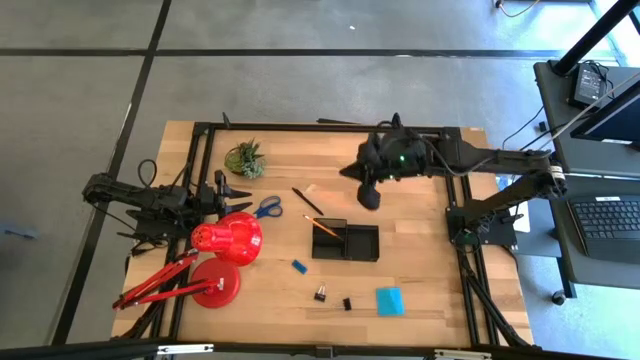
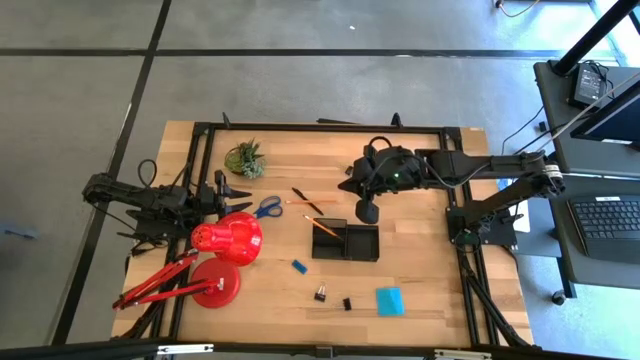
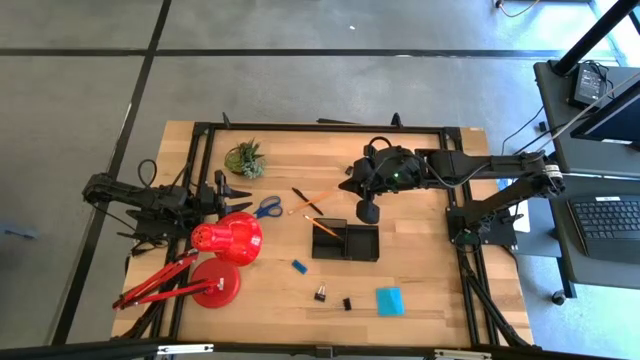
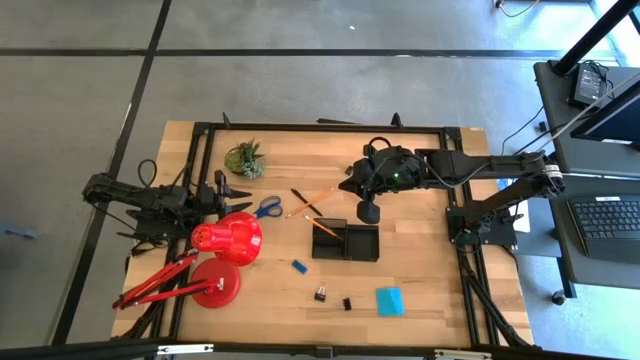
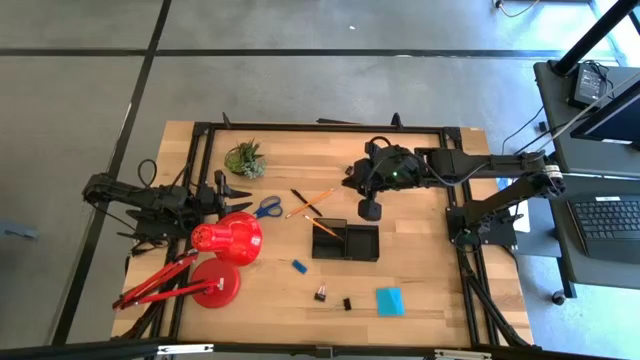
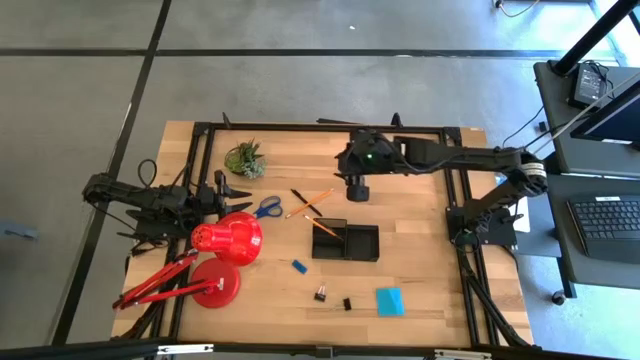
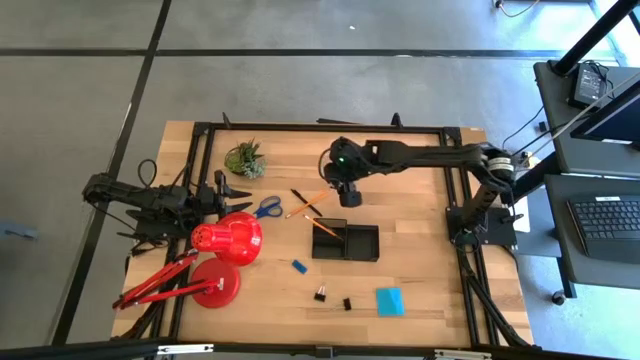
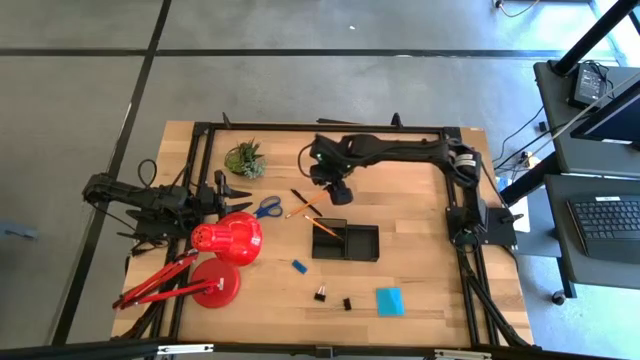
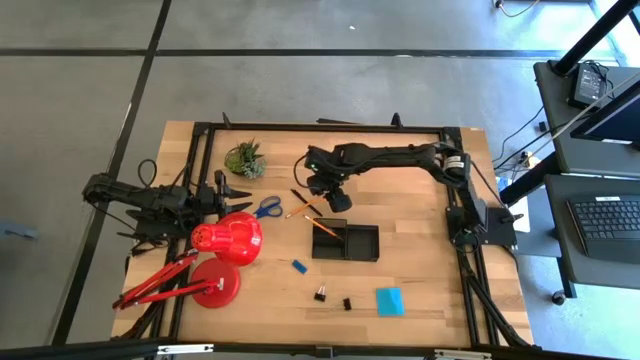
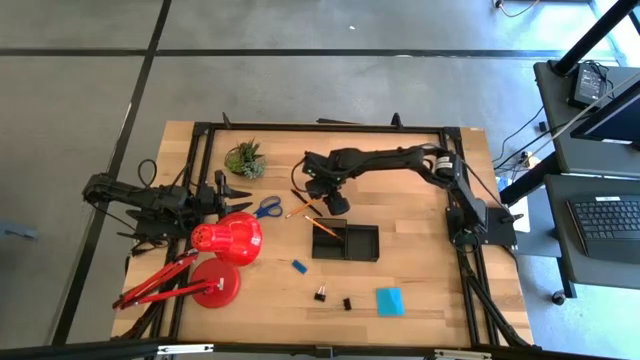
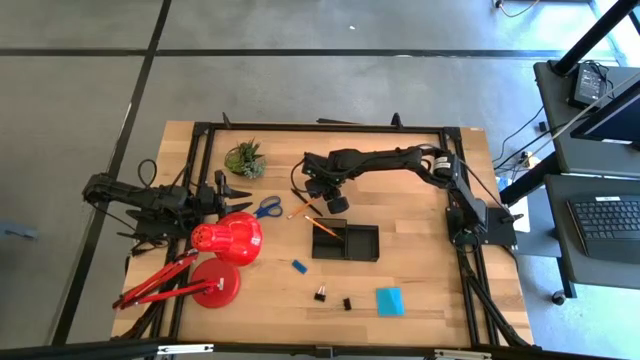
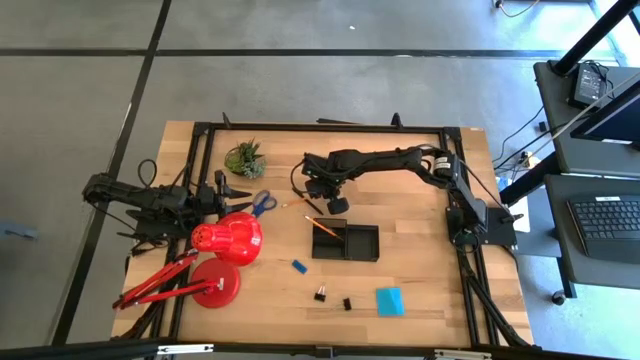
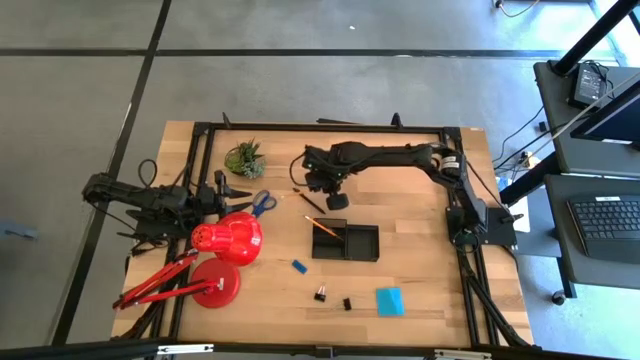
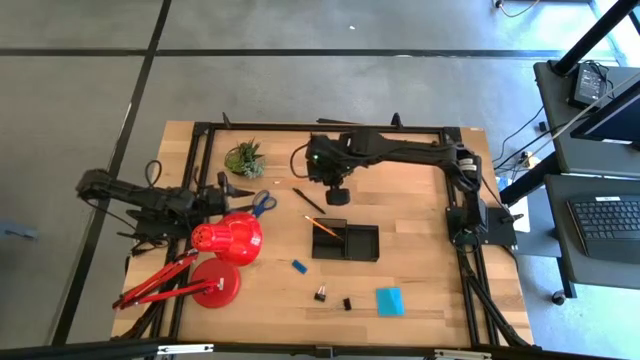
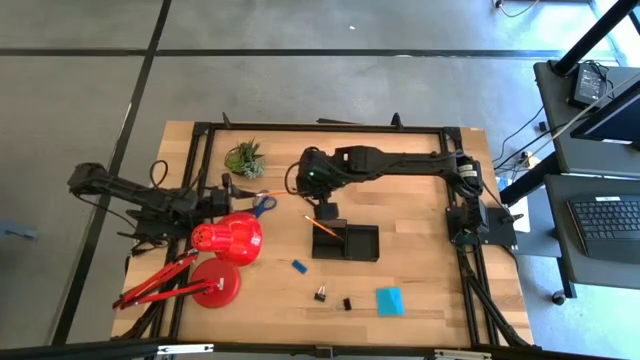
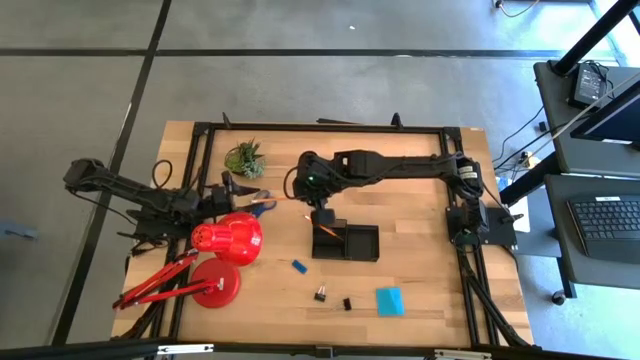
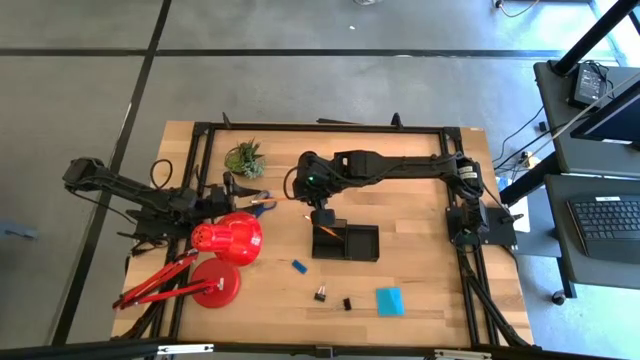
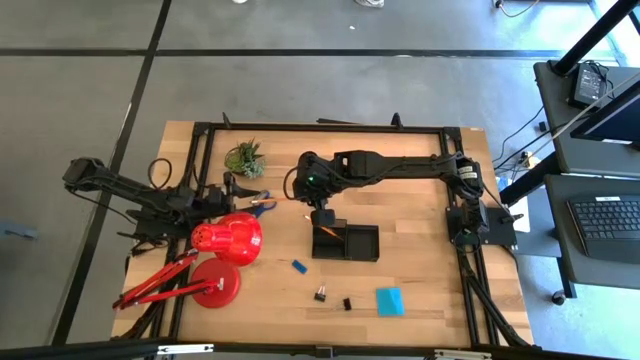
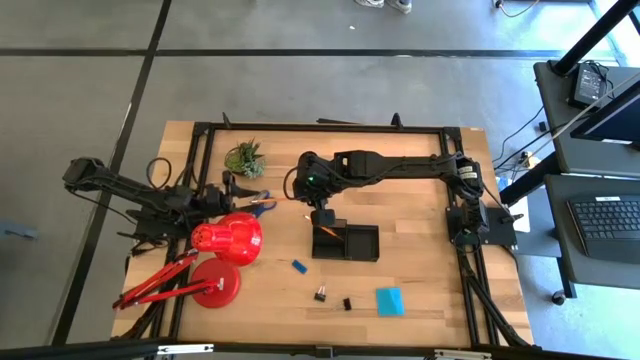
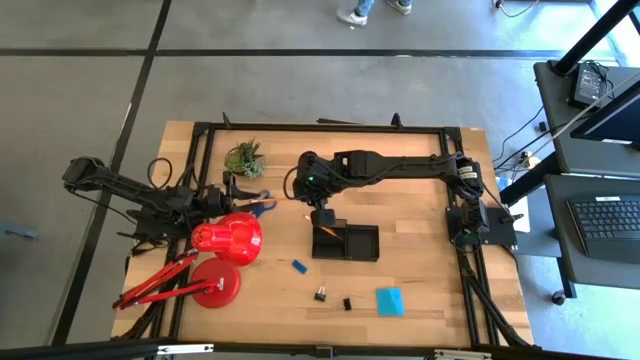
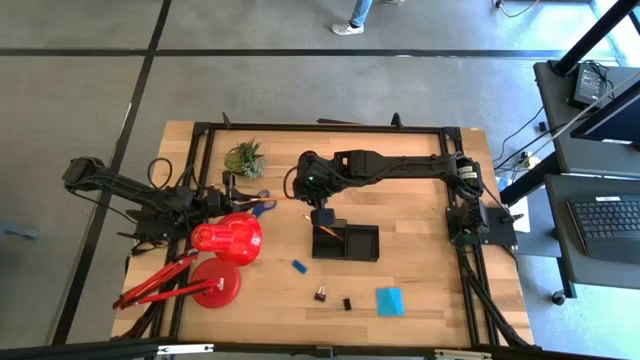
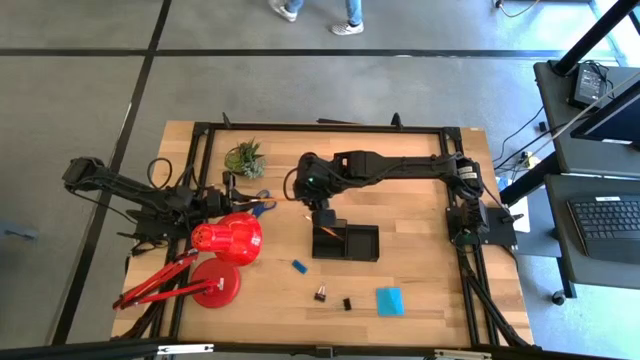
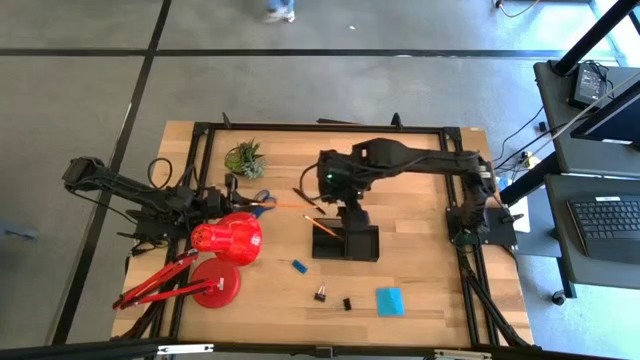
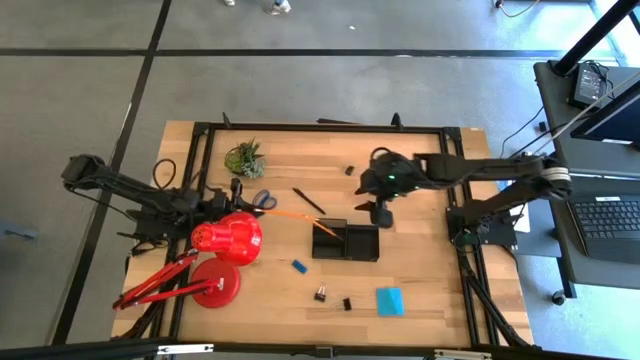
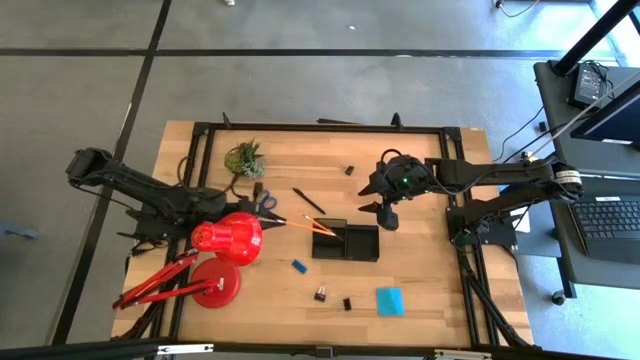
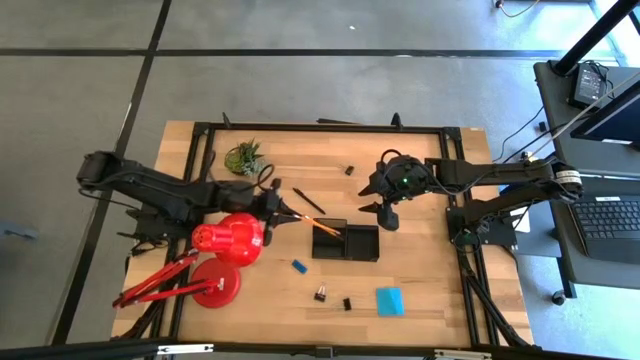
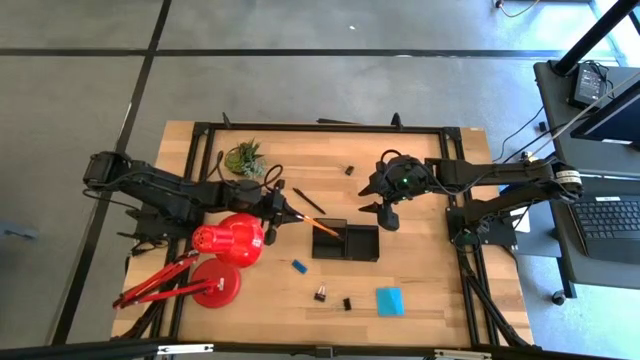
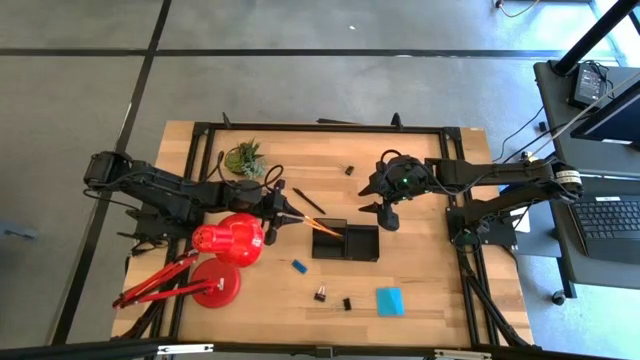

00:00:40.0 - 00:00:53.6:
Task: Pick and place office supplies into organizer
Put the orange pencil into the black desk organizer
